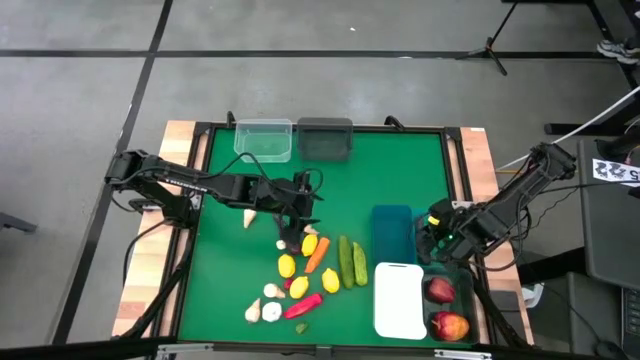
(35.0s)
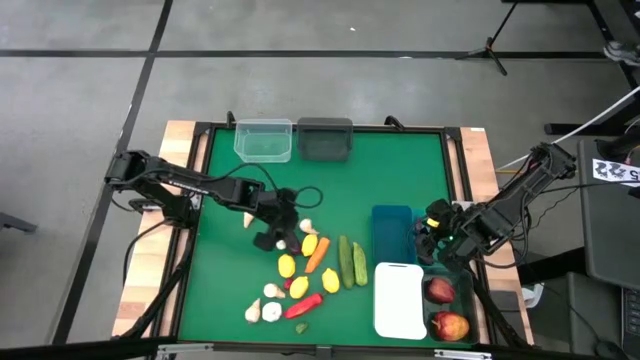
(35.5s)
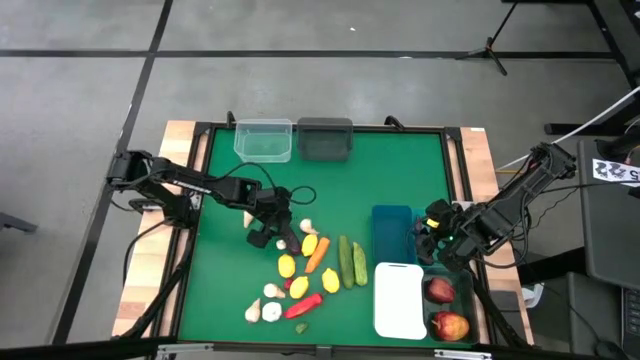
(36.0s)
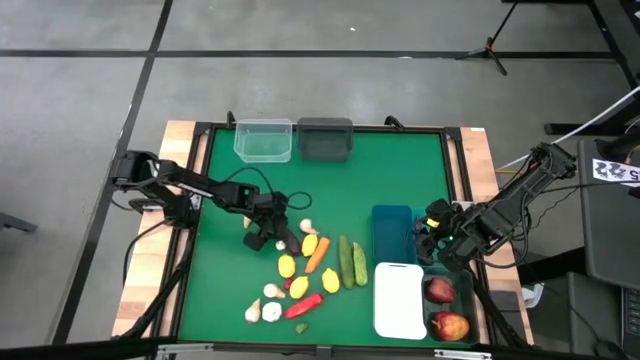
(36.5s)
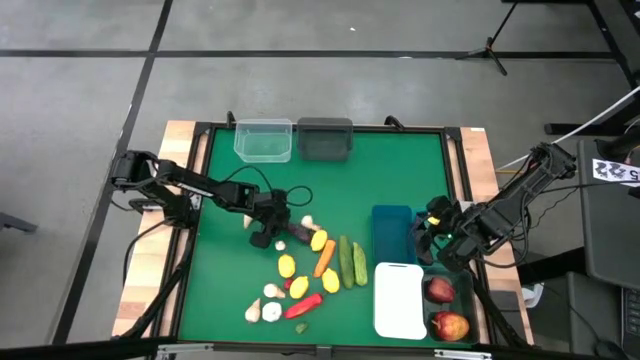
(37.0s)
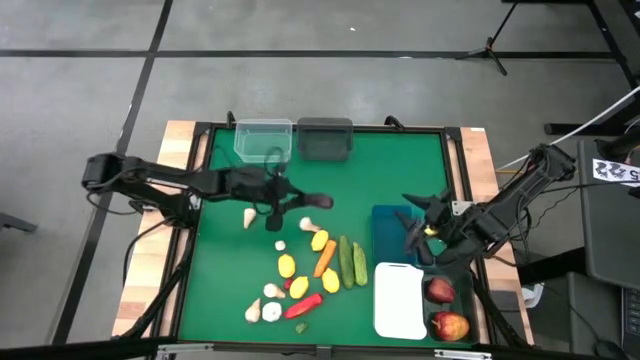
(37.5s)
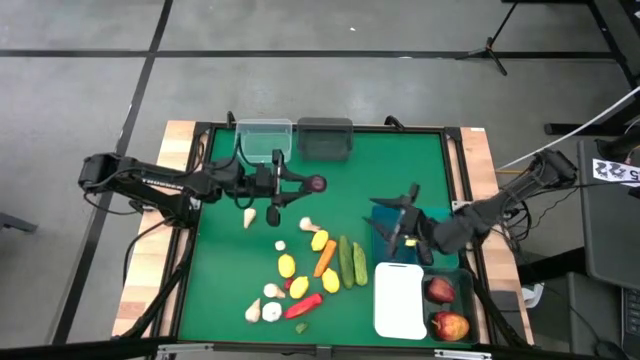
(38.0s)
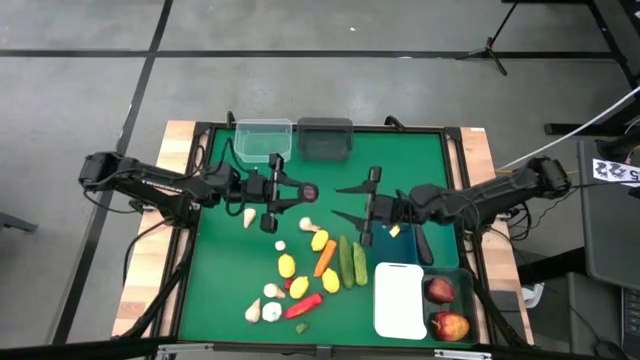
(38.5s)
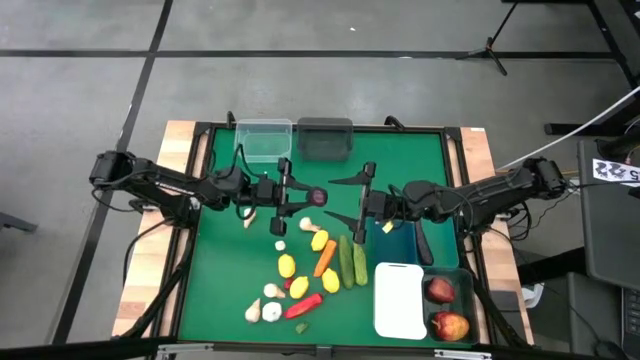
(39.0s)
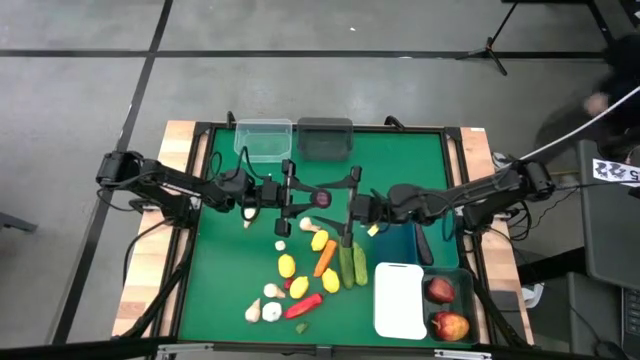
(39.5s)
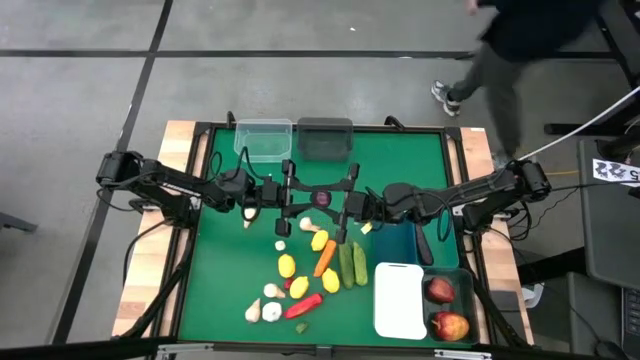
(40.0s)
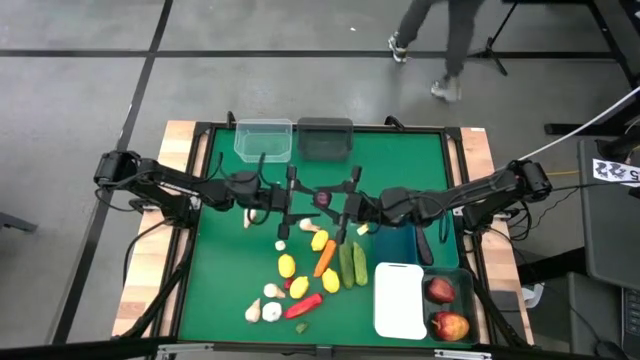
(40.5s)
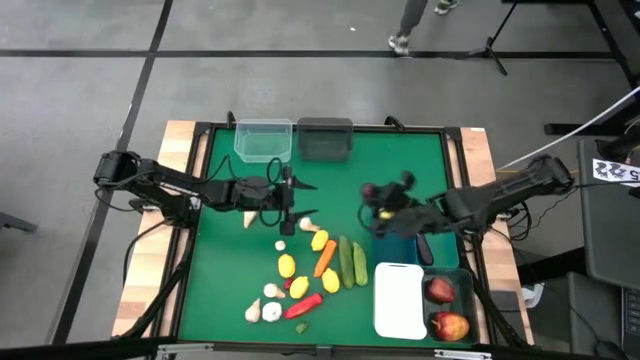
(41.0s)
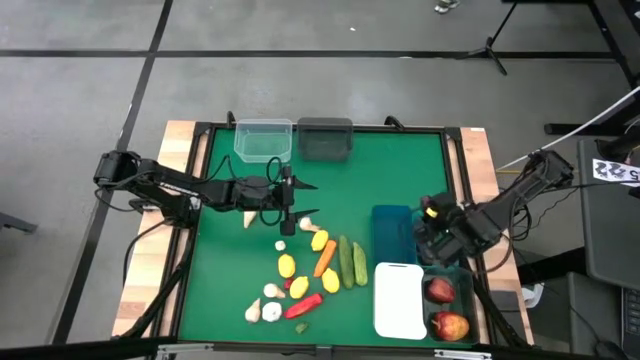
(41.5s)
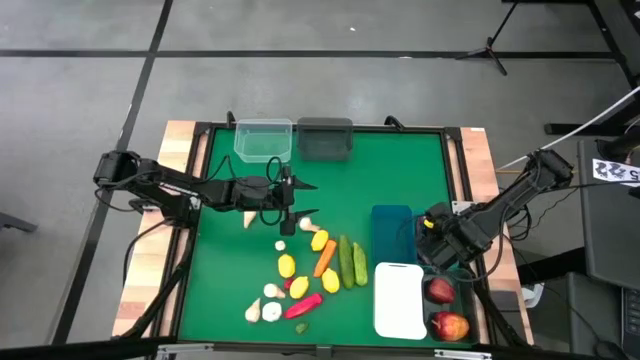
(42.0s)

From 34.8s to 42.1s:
Task: Sort produce into baskets
Put the purple eggplant into the green bin

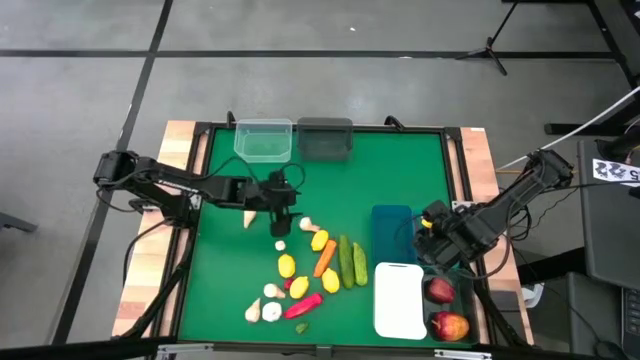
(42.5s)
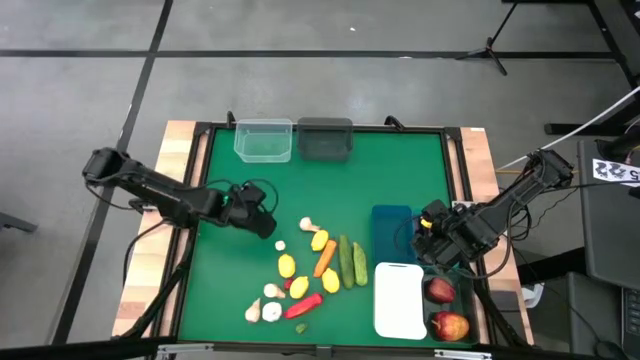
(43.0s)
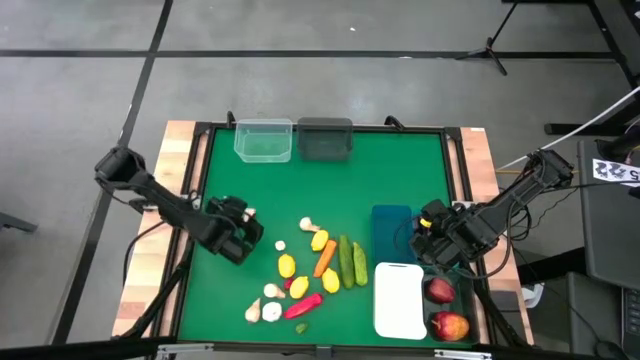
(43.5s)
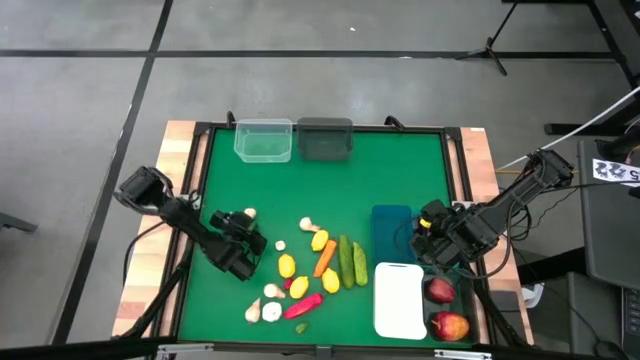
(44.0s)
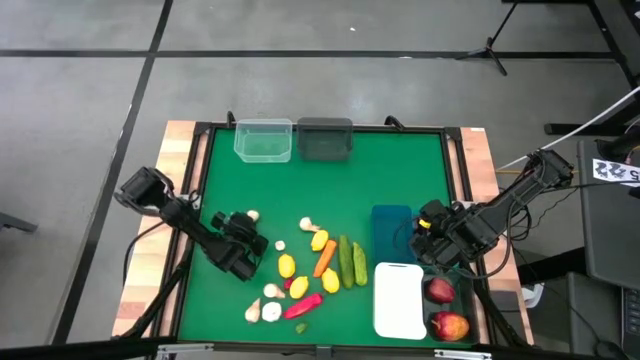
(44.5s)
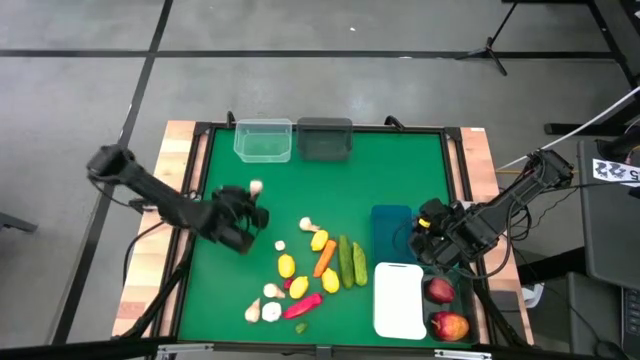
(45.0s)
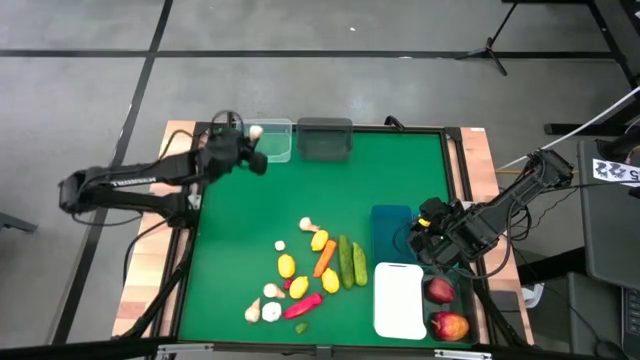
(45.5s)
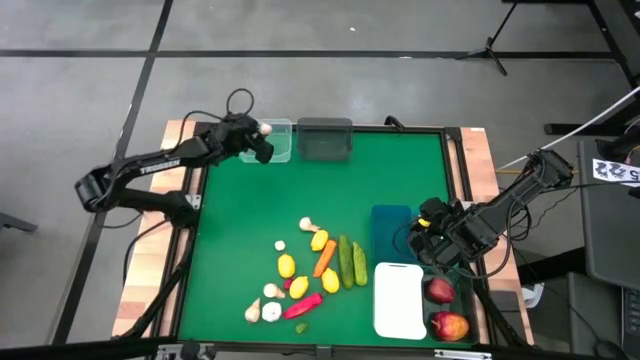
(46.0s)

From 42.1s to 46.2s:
Put the white garlic into the transparent bin

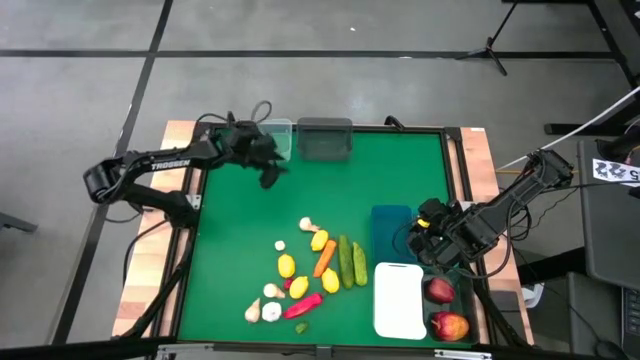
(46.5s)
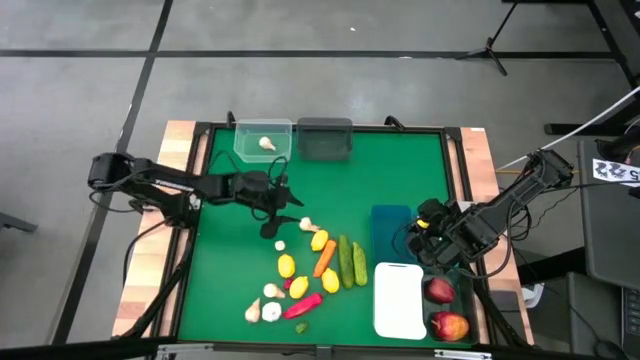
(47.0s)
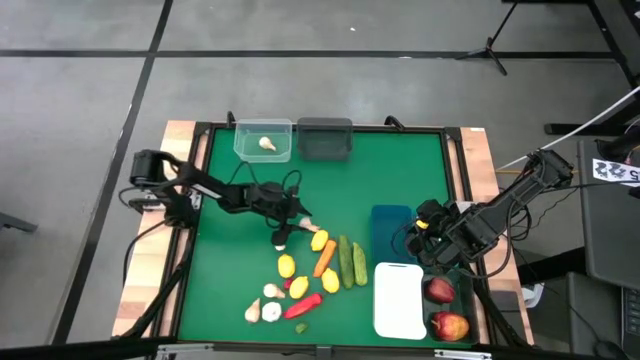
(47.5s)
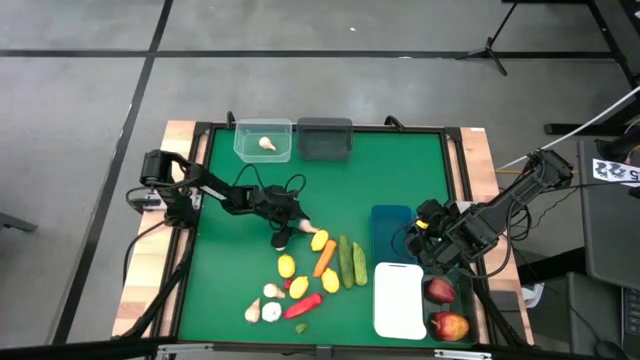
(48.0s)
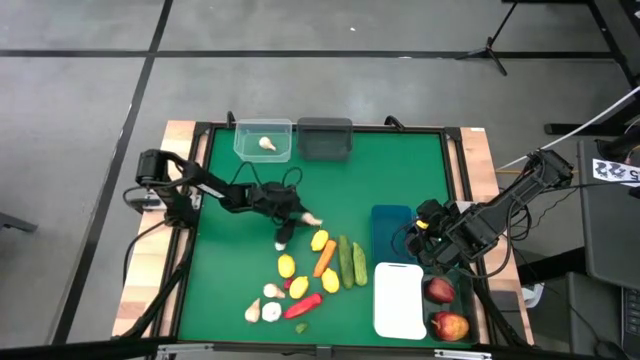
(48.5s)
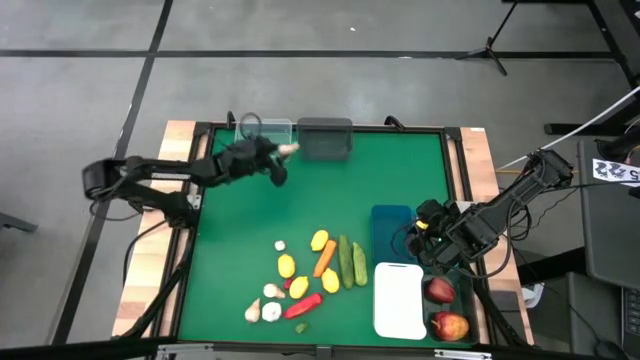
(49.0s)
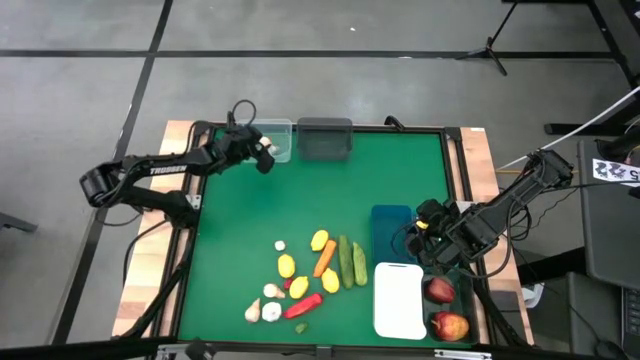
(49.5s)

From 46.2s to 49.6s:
Put the white garlic into the transparent bin

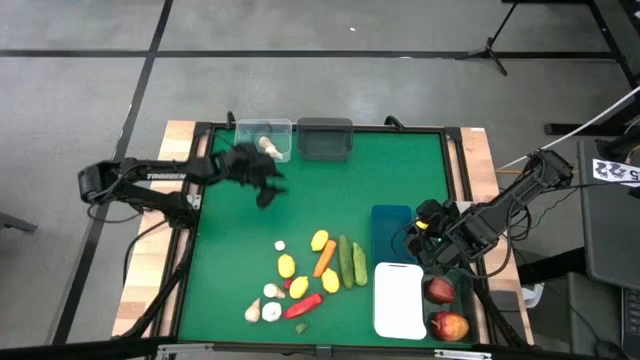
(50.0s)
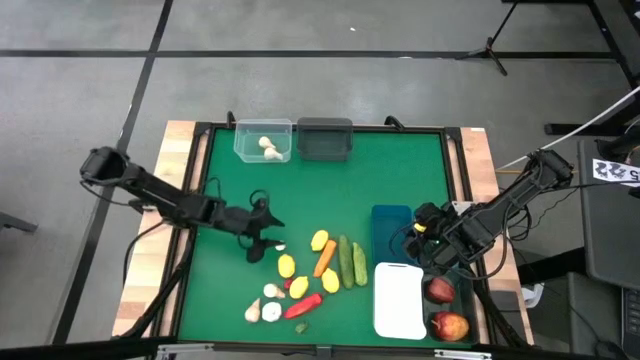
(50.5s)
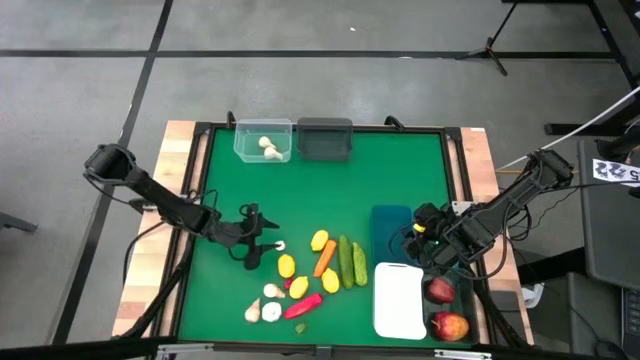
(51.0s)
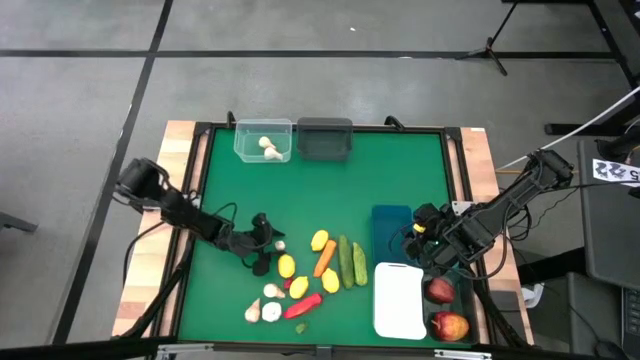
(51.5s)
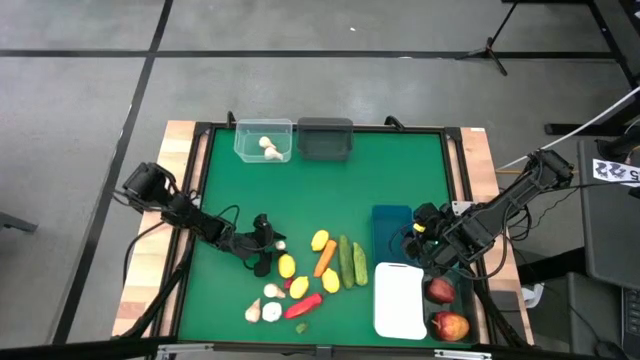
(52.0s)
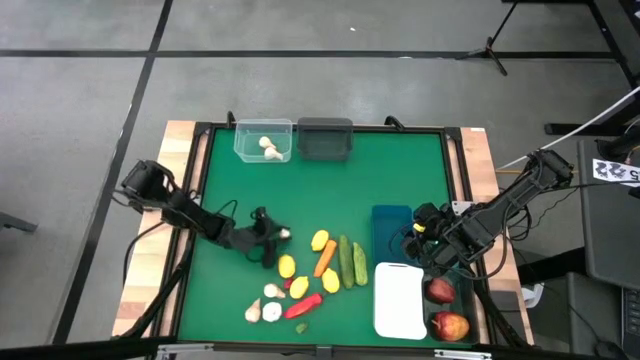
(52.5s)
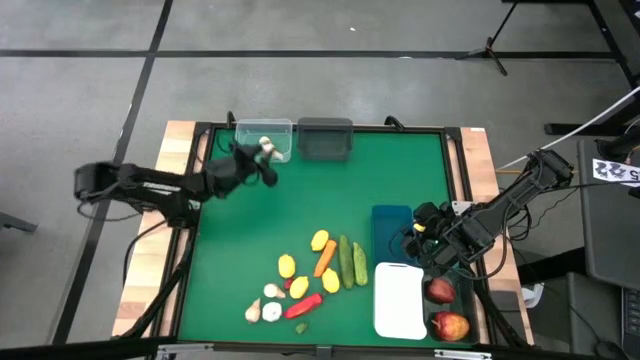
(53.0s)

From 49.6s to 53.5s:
Put the white garlic into the transparent bin

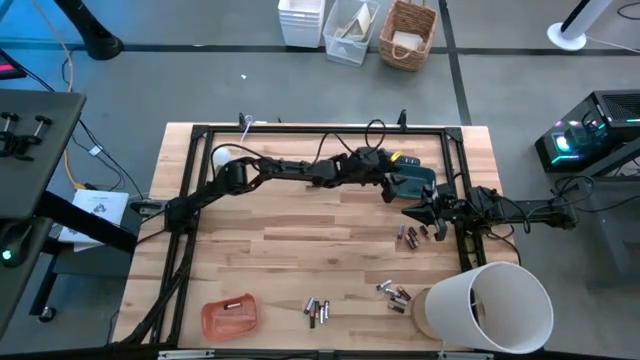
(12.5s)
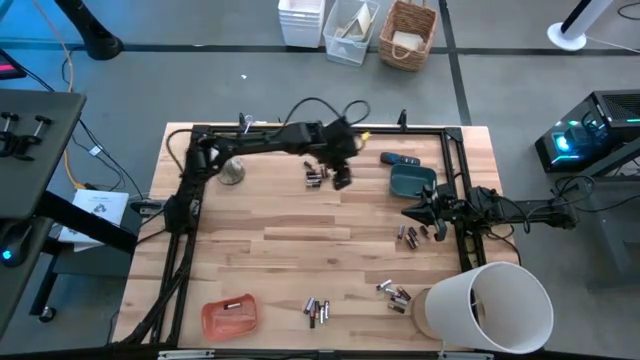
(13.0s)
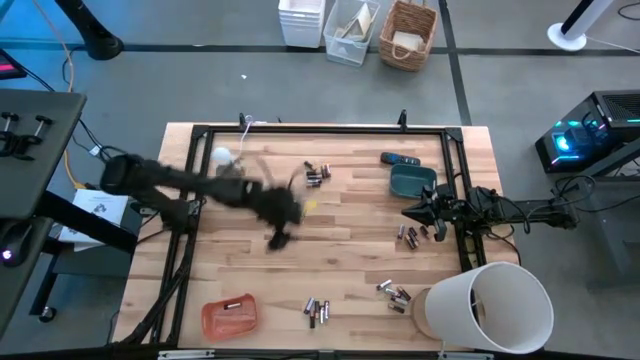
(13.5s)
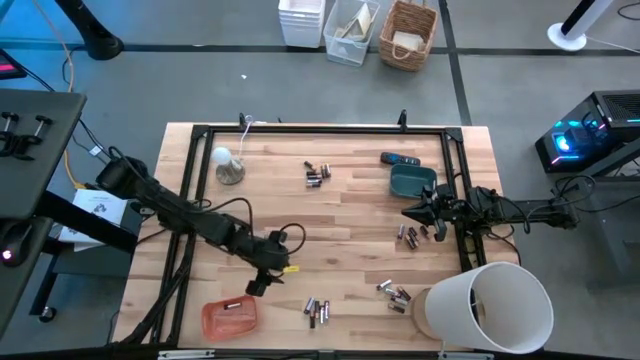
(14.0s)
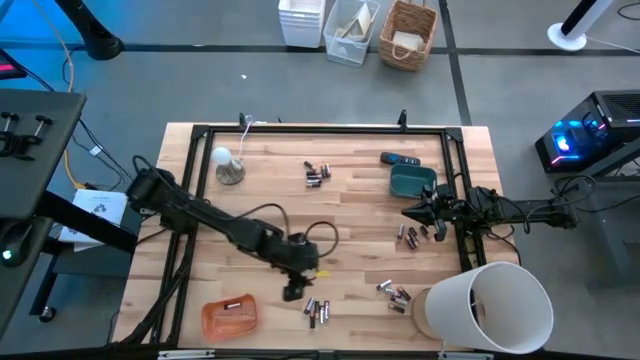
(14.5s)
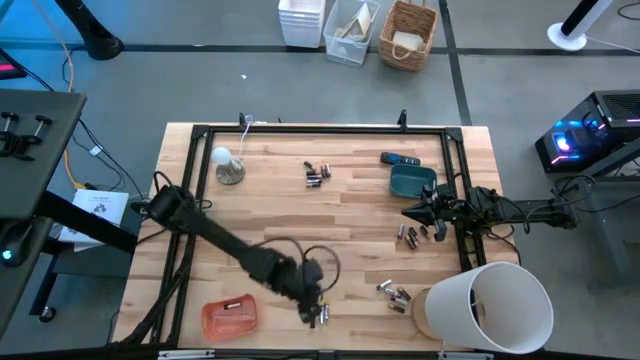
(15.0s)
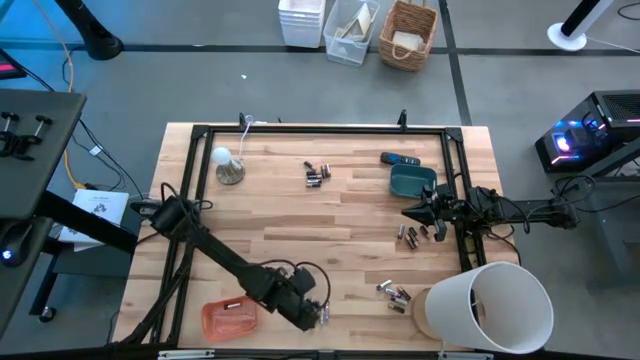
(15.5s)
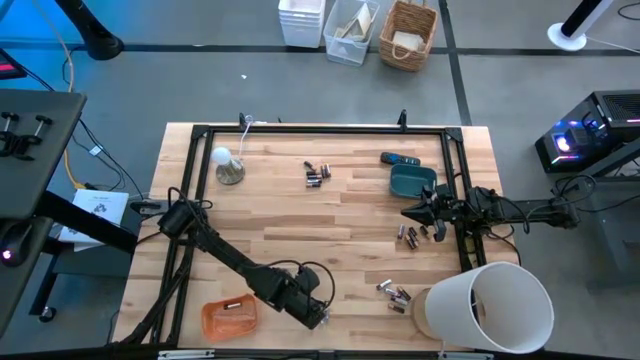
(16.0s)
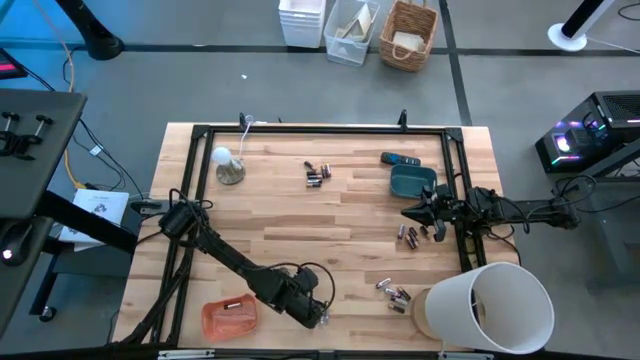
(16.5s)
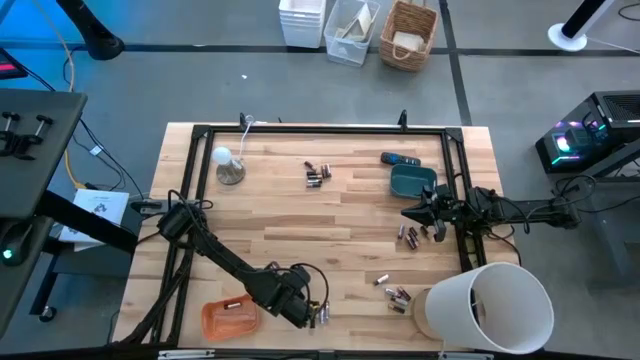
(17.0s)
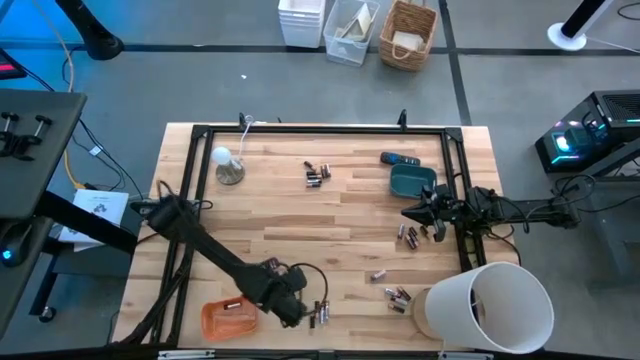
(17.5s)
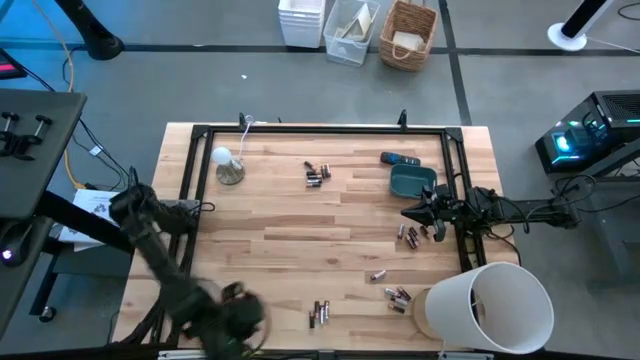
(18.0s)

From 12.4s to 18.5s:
Task: Sort batteries
Put the silver battery into the orange bin
